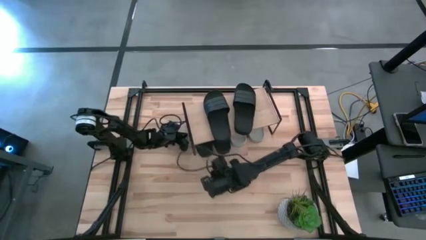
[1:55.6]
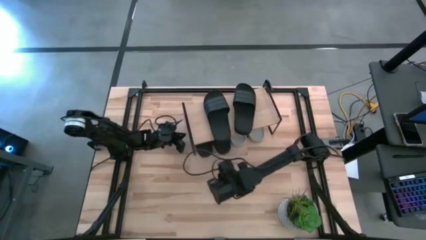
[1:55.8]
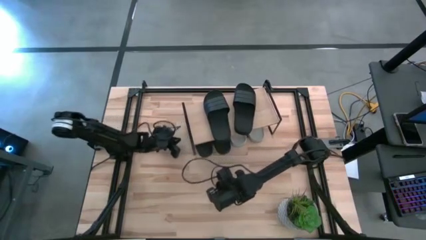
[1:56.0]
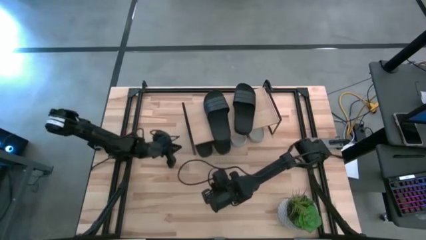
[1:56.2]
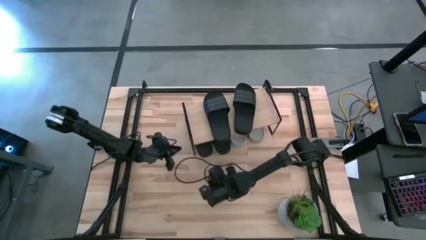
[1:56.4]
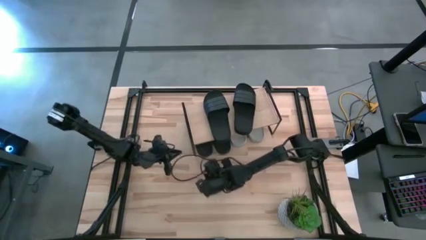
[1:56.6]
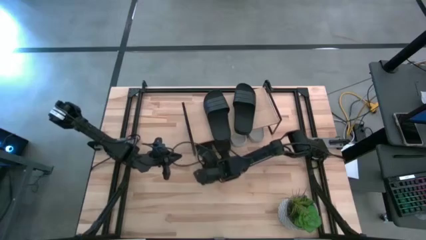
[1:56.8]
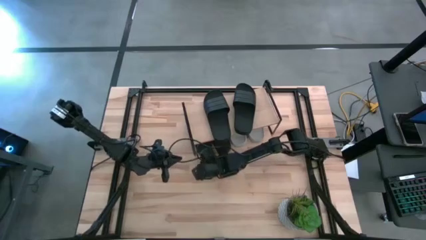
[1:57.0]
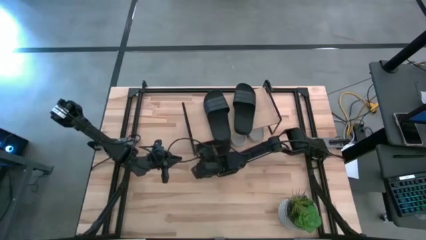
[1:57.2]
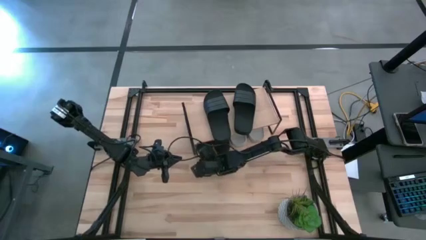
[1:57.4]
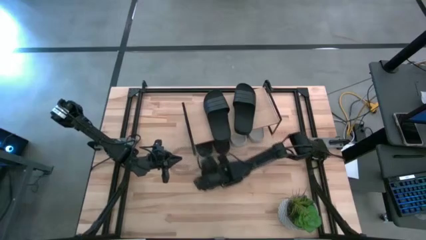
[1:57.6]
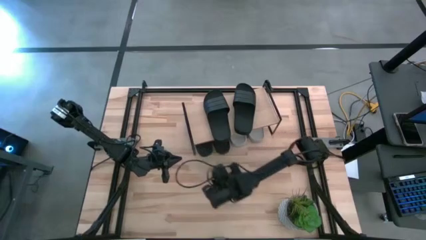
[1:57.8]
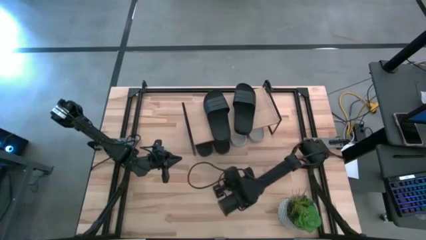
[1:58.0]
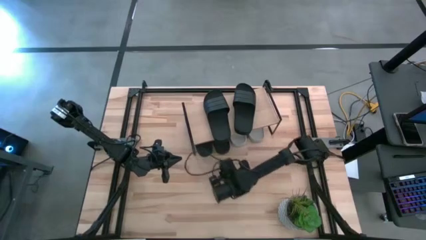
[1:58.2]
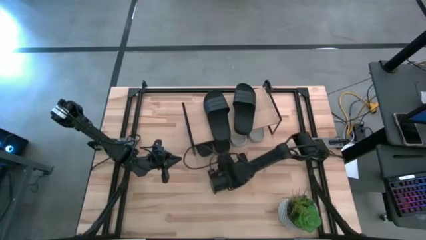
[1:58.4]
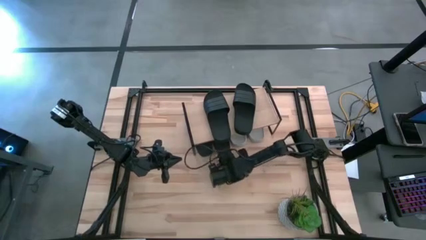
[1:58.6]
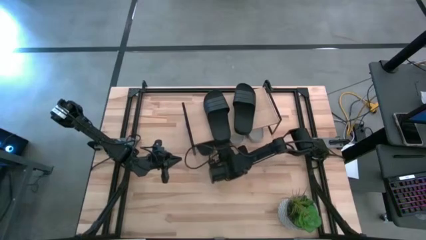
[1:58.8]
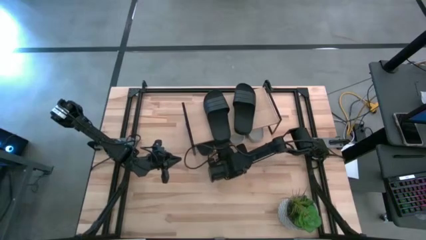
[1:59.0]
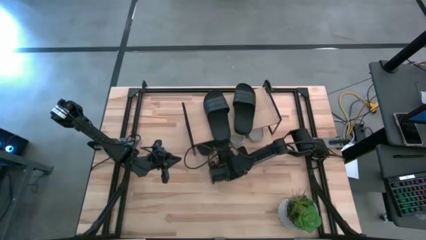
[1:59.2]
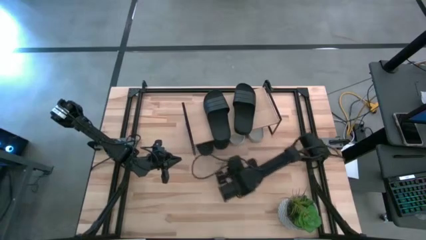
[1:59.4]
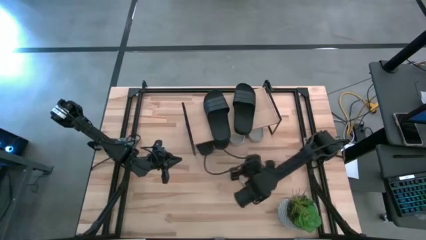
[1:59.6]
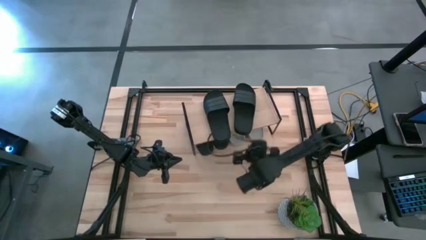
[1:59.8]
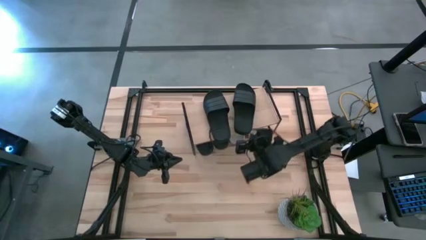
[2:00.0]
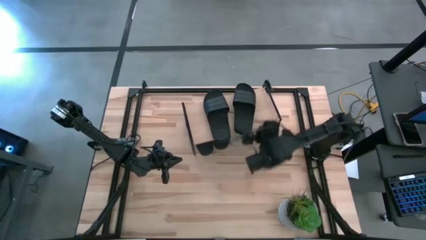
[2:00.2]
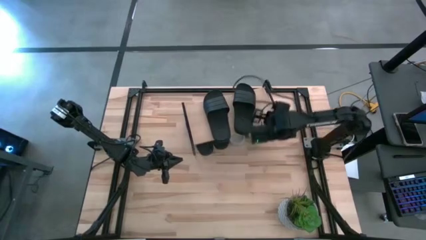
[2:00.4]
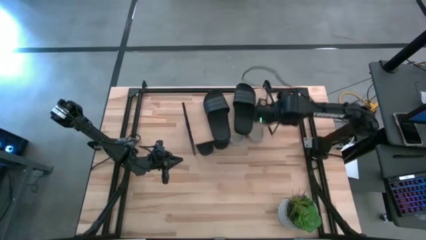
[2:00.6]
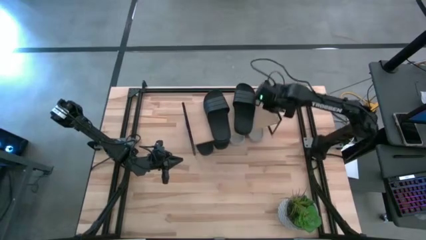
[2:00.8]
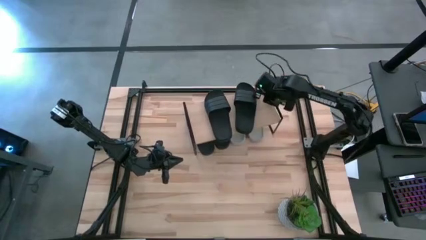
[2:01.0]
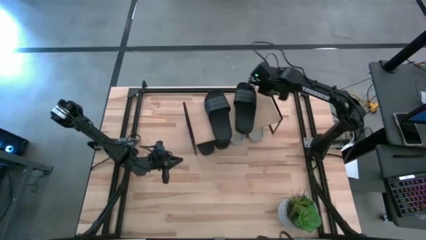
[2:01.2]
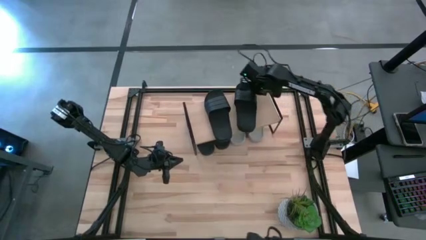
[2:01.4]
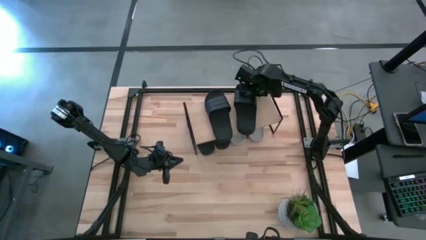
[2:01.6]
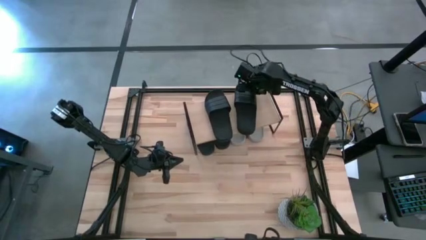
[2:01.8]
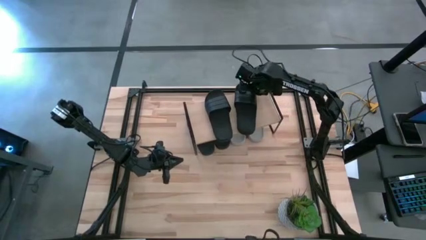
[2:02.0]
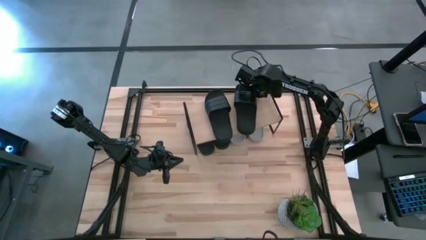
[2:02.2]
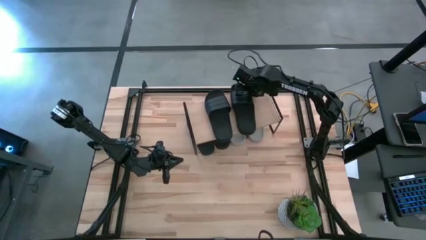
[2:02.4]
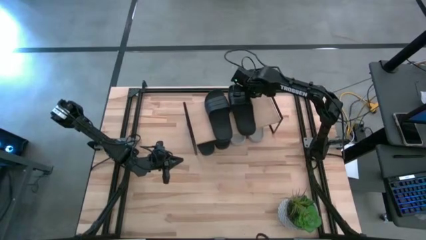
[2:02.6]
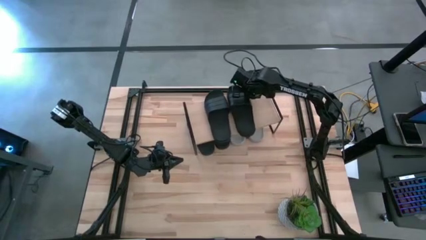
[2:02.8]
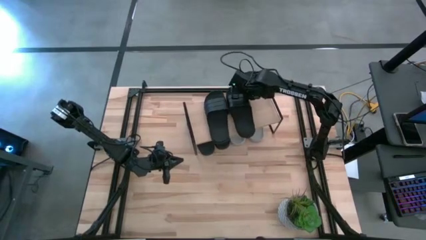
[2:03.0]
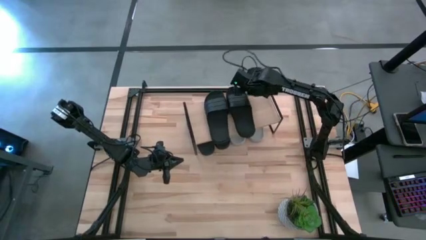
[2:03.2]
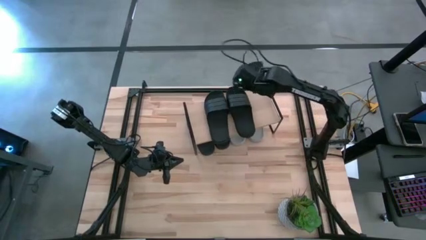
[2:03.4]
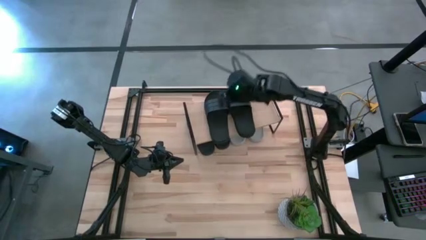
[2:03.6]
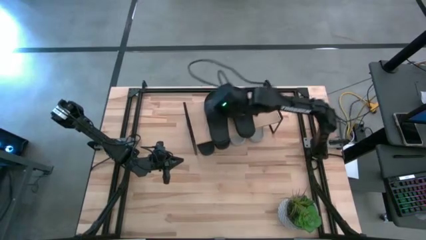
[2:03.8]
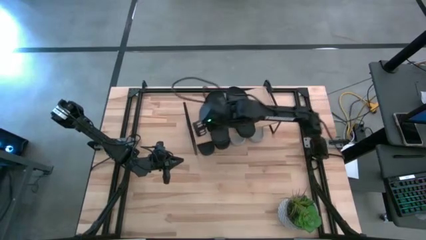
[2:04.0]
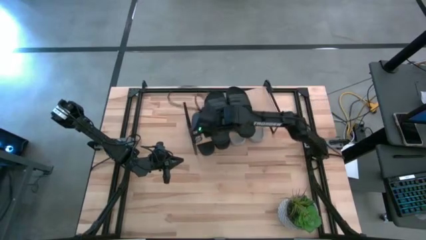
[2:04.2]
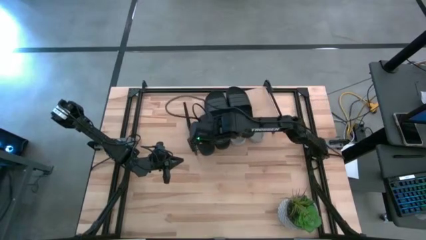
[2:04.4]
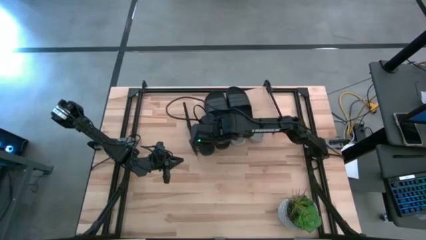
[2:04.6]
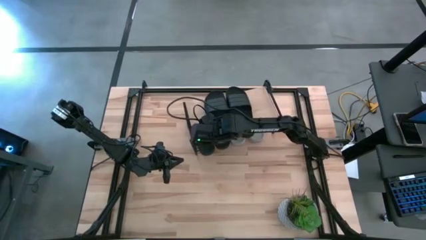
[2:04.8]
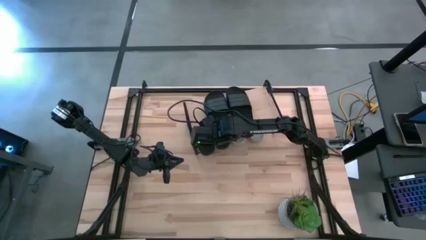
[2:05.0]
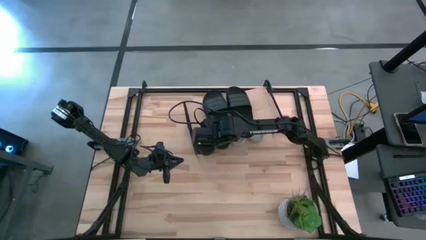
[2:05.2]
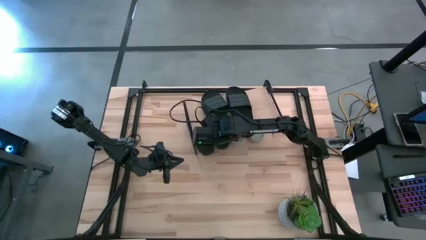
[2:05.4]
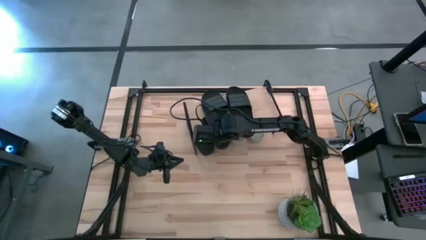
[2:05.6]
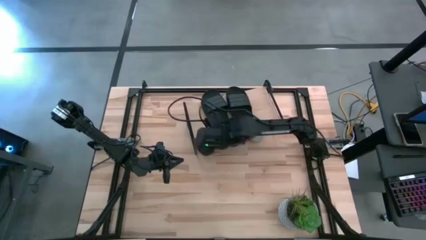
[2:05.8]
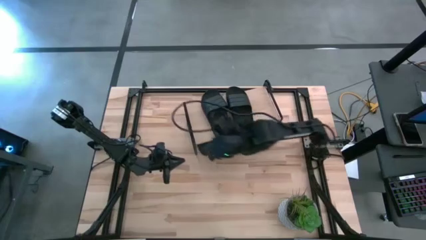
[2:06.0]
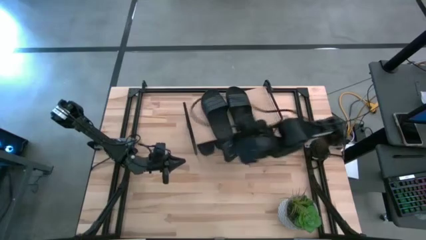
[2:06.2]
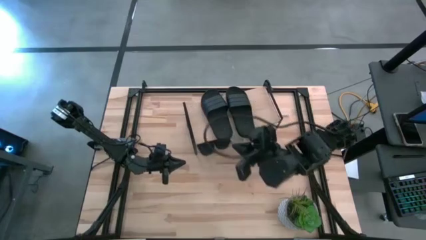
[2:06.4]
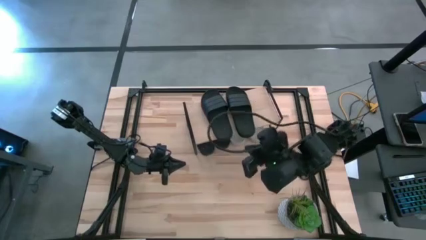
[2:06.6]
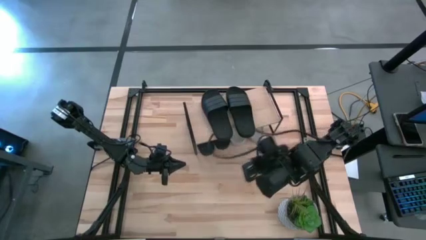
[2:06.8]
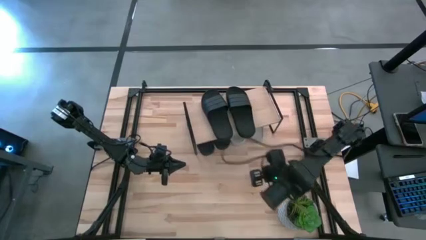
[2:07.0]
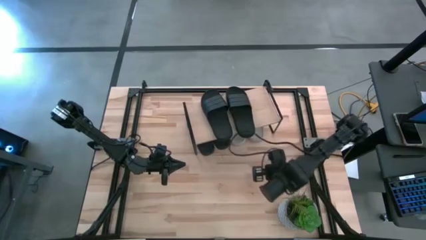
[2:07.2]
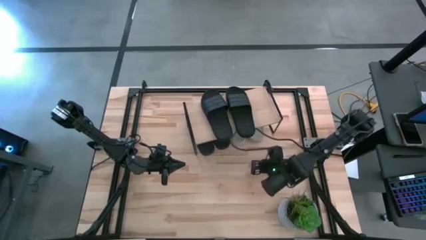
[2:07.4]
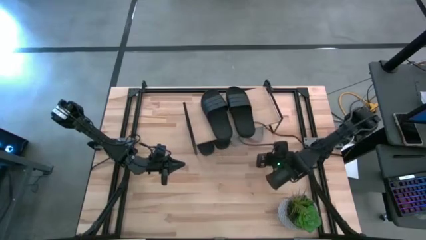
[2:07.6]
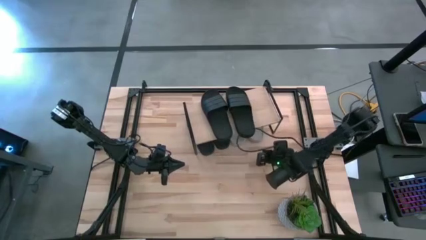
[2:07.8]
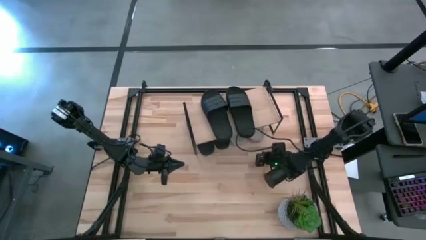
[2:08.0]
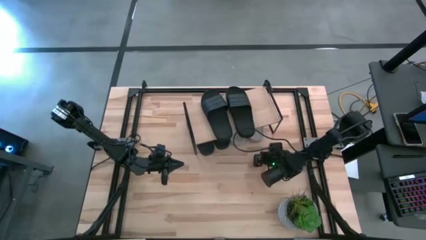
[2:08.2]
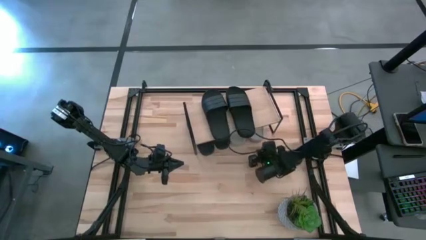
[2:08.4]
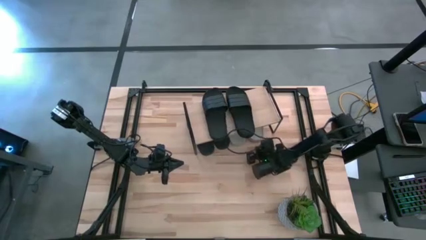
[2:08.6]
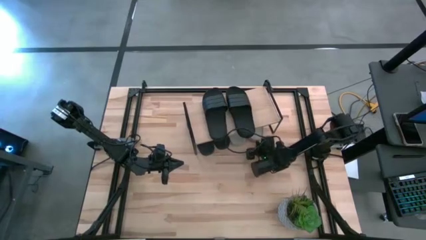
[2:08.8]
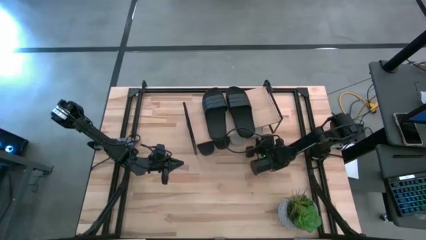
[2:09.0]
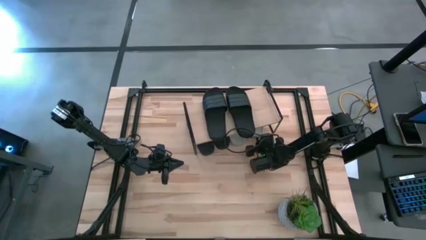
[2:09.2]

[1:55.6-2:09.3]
Task: Pick and place slides into the shelf
Adjust the slides under and on the shelf

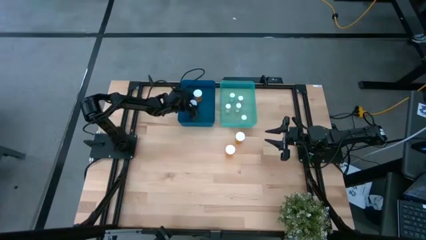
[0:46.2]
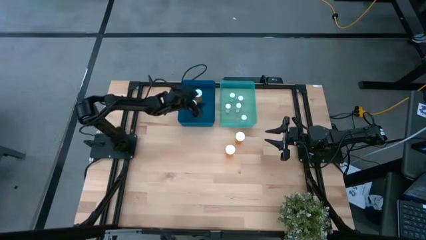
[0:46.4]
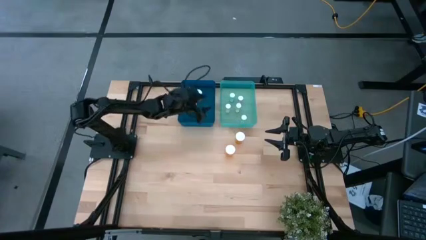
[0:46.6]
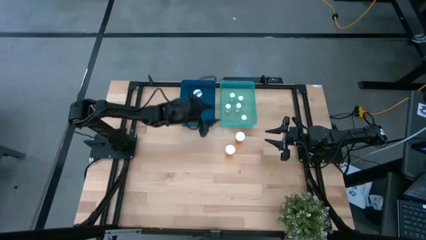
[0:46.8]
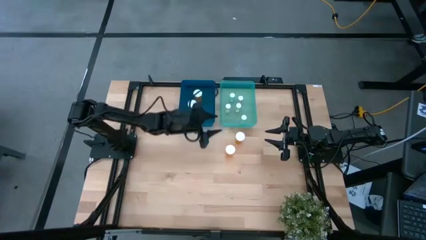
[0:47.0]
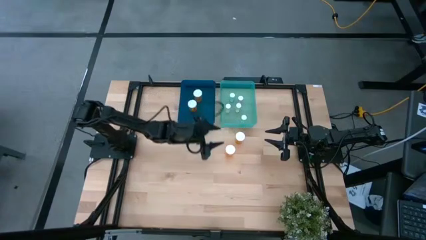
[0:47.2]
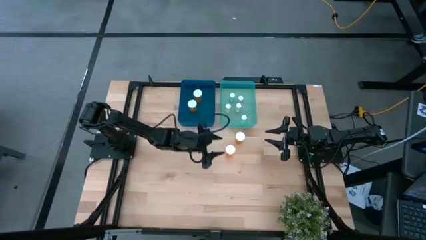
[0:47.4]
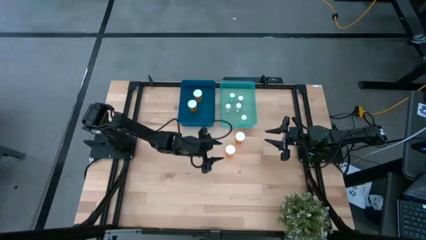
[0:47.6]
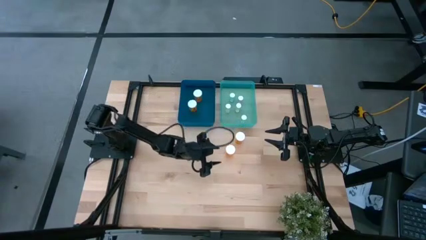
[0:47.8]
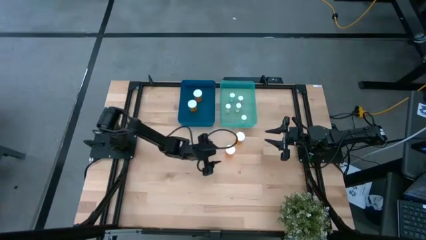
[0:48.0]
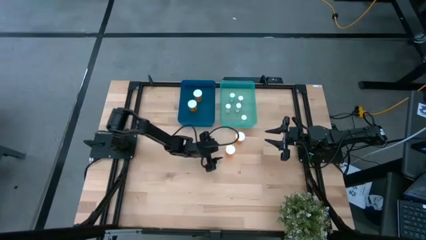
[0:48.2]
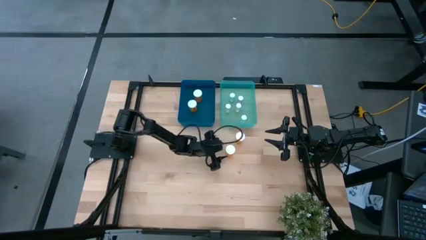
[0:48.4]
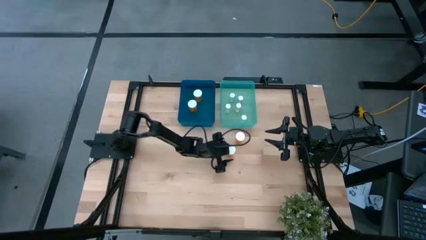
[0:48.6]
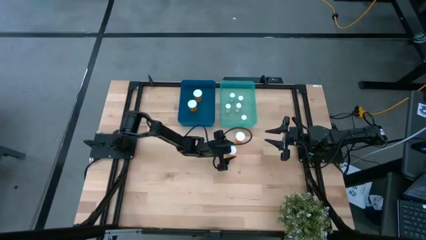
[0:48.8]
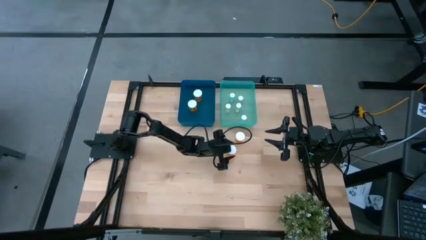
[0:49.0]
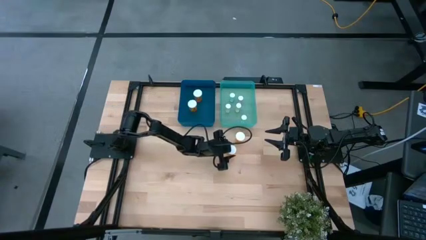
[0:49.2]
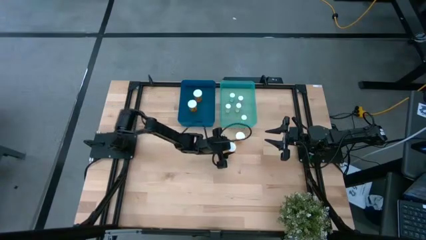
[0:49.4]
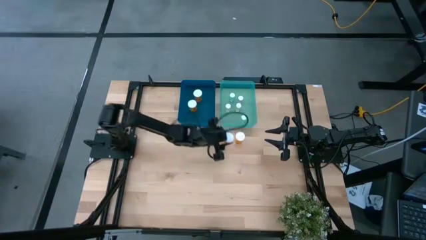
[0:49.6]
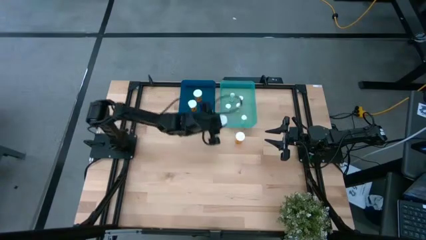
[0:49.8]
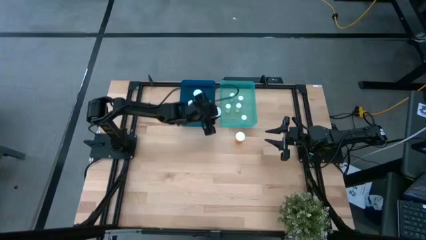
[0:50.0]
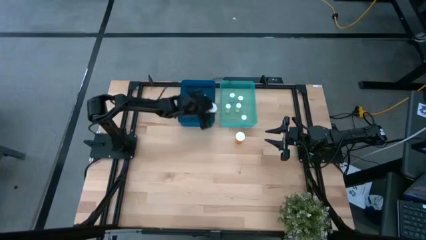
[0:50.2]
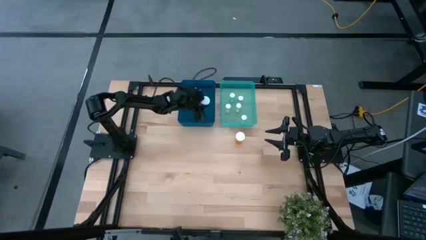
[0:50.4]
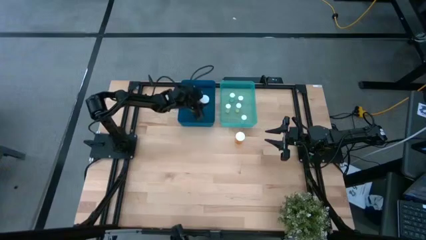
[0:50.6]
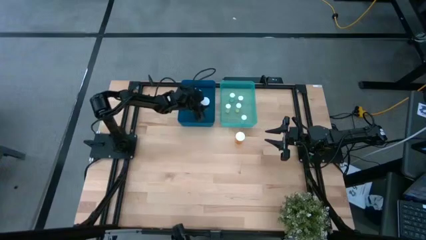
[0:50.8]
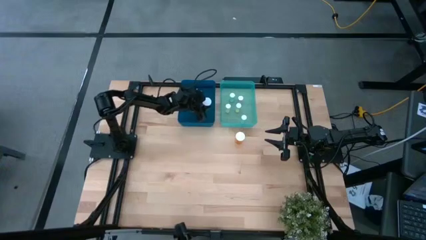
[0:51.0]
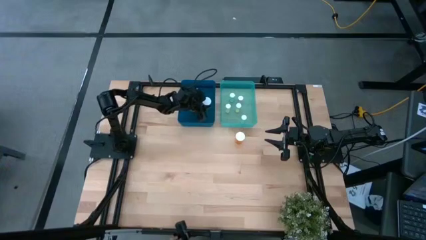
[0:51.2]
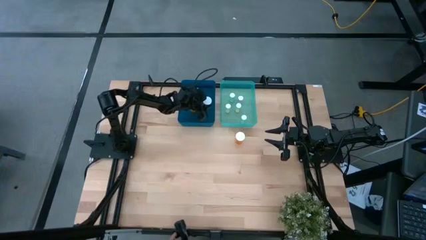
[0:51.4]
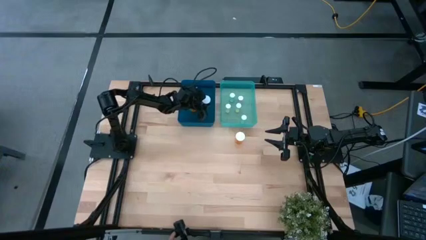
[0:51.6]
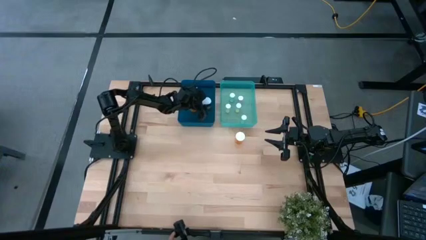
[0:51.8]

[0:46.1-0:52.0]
Task: Pick and place medicine bottles into bin by pill shape (circle, oval)
Put the orange capsule bottle into the blue bin
